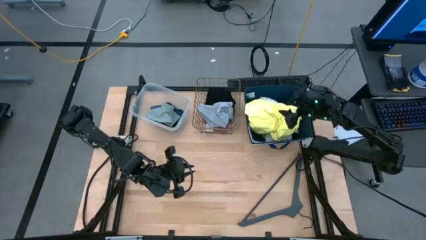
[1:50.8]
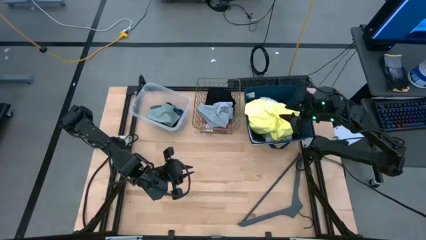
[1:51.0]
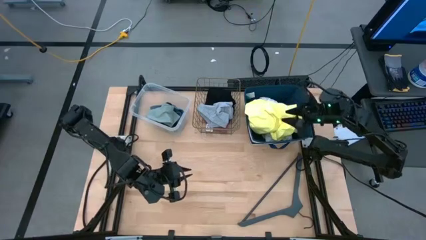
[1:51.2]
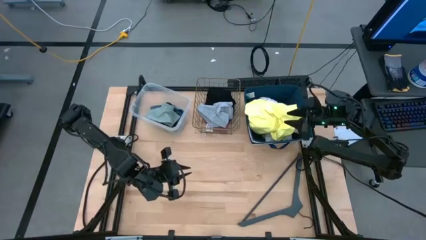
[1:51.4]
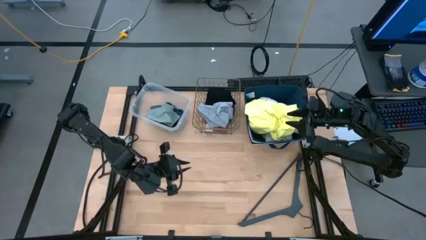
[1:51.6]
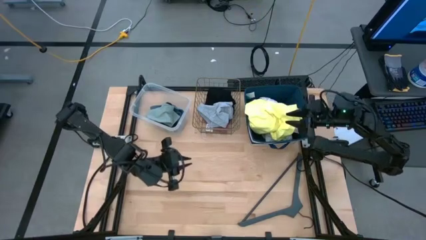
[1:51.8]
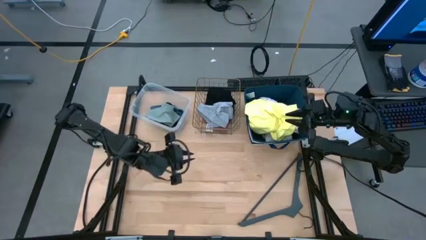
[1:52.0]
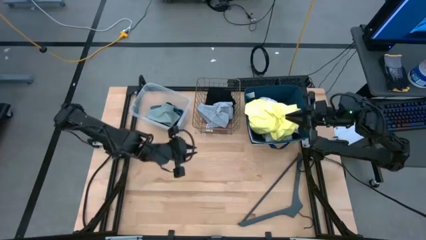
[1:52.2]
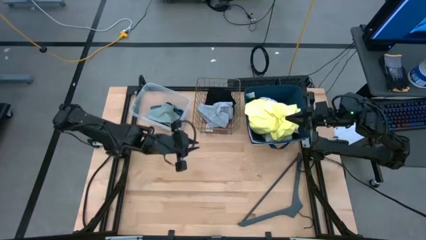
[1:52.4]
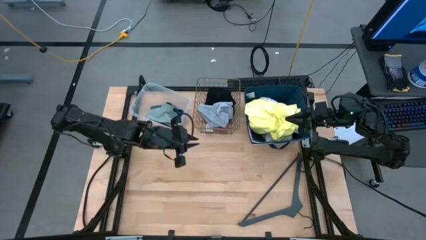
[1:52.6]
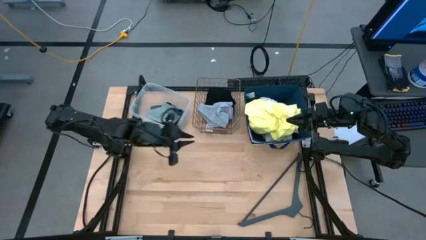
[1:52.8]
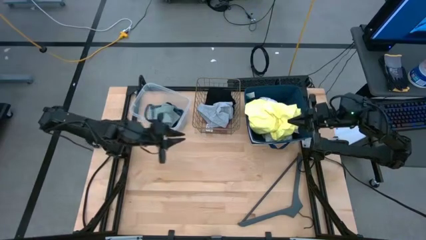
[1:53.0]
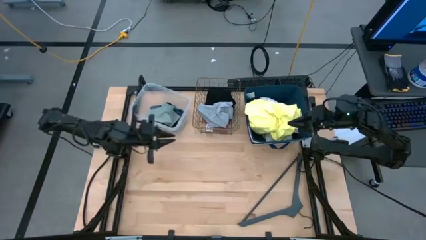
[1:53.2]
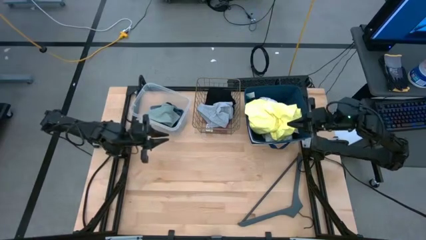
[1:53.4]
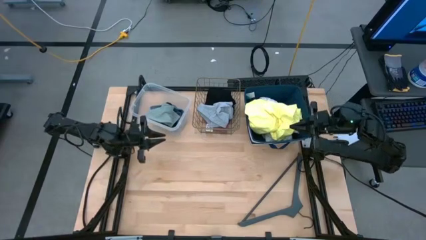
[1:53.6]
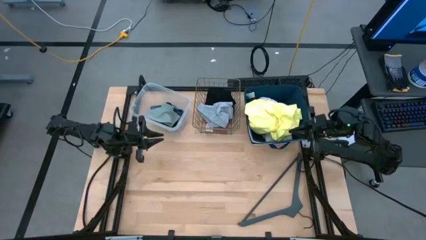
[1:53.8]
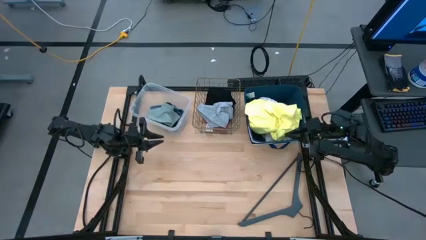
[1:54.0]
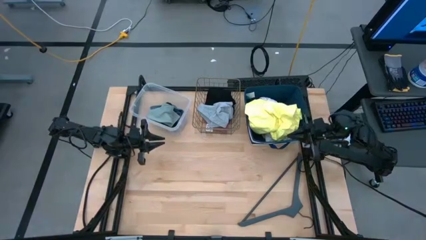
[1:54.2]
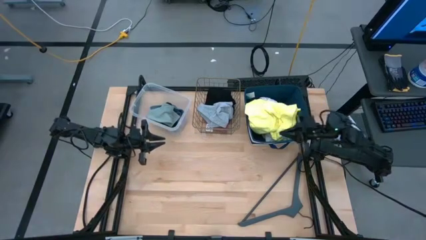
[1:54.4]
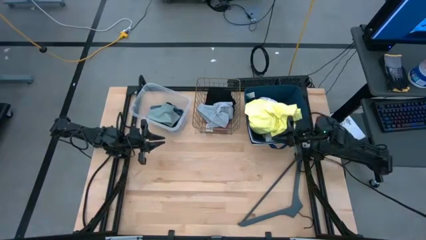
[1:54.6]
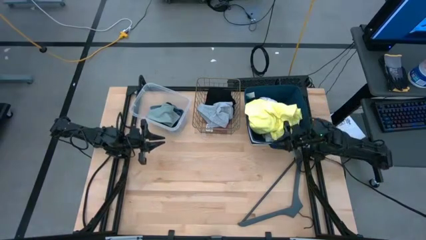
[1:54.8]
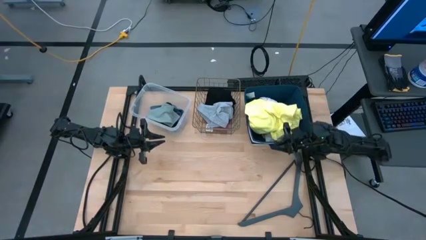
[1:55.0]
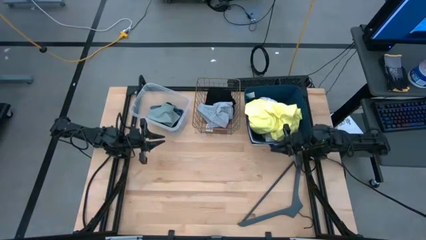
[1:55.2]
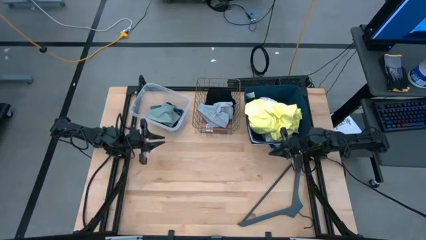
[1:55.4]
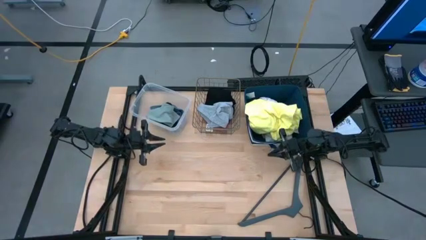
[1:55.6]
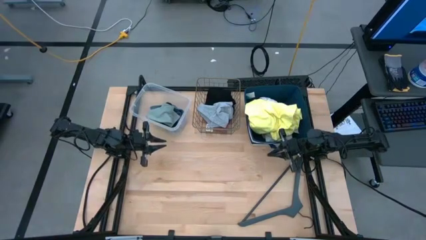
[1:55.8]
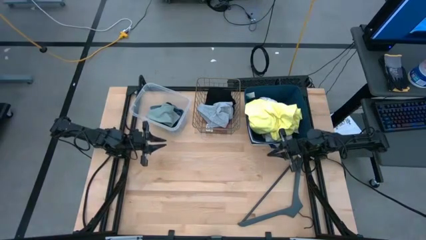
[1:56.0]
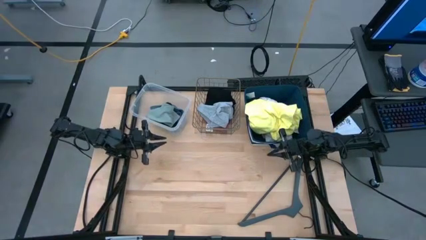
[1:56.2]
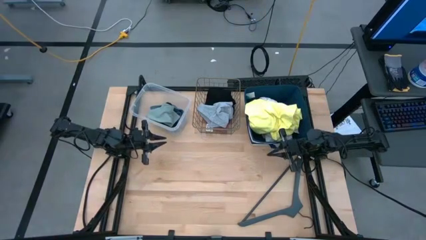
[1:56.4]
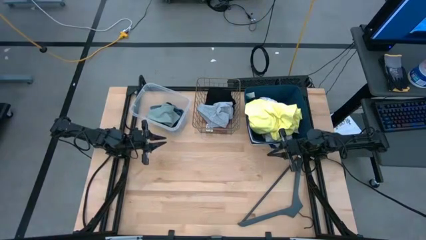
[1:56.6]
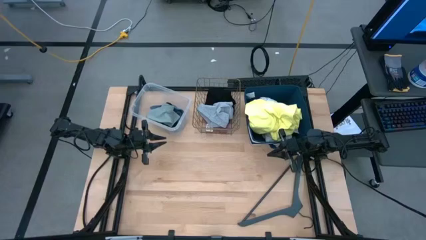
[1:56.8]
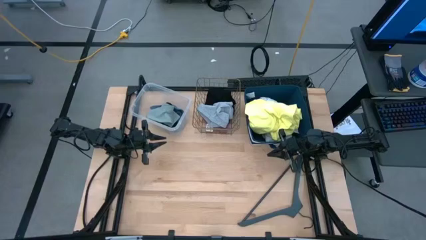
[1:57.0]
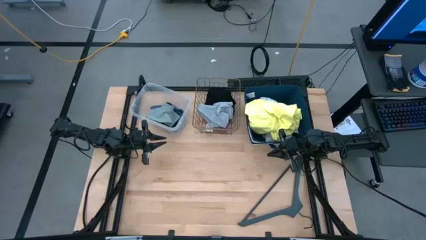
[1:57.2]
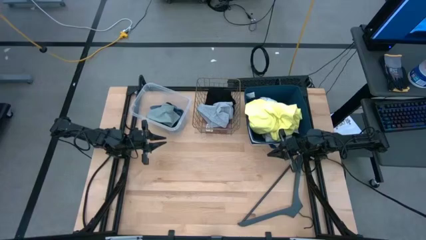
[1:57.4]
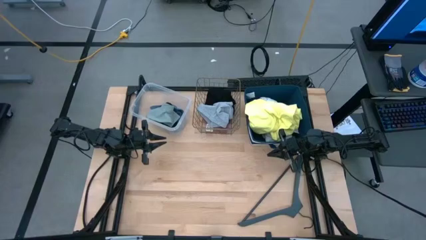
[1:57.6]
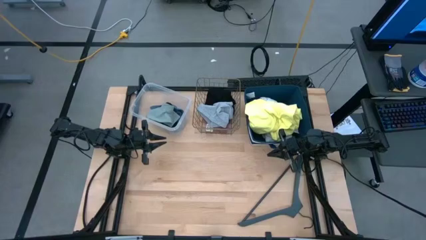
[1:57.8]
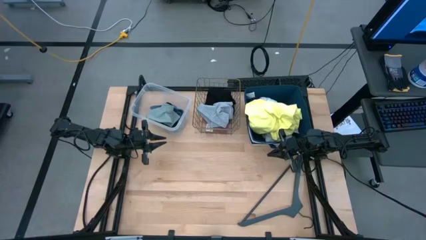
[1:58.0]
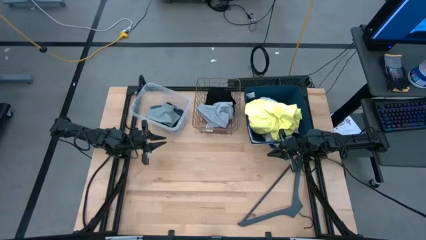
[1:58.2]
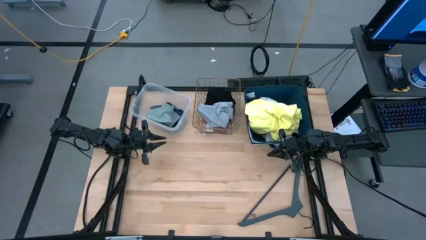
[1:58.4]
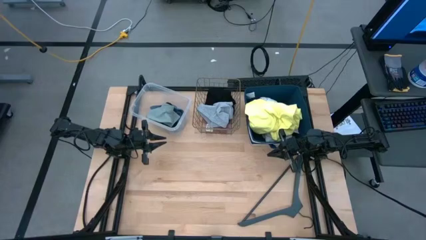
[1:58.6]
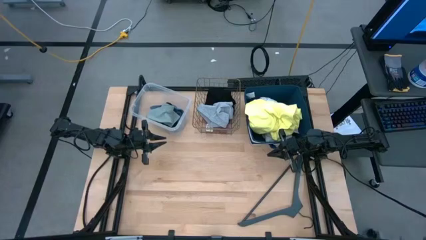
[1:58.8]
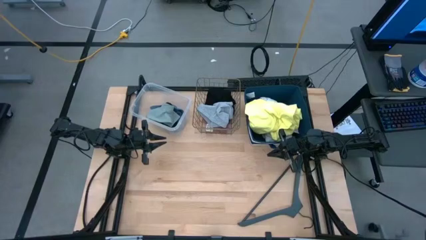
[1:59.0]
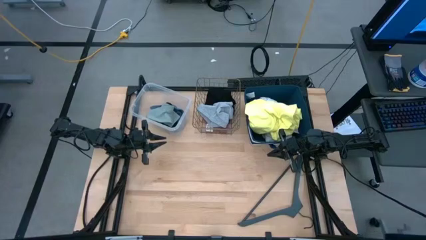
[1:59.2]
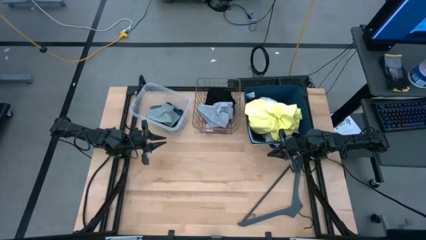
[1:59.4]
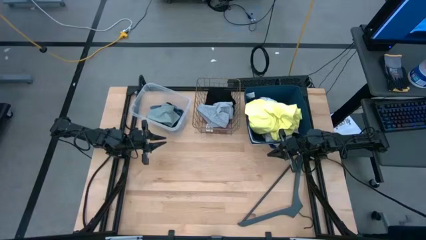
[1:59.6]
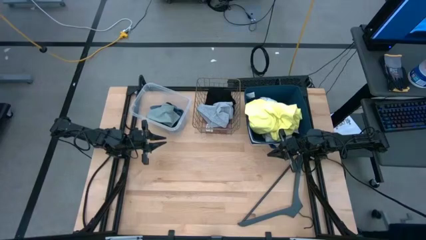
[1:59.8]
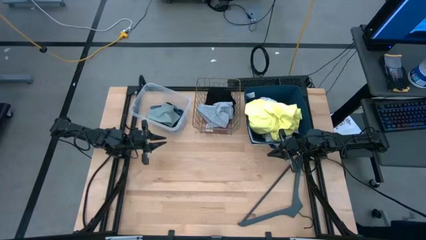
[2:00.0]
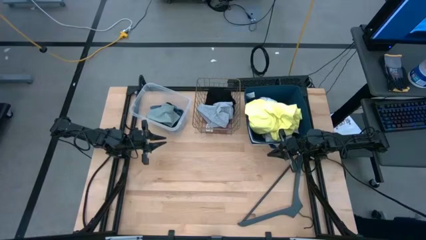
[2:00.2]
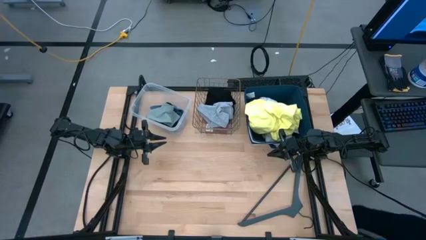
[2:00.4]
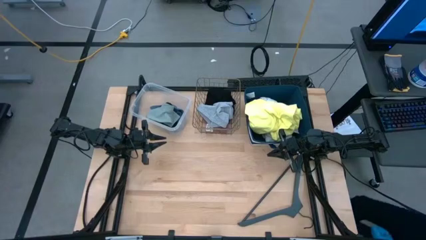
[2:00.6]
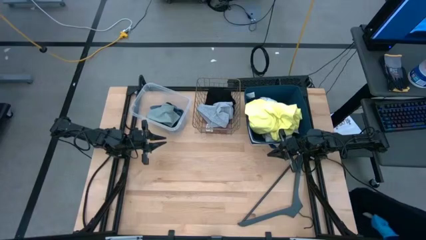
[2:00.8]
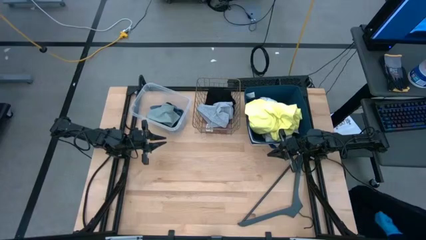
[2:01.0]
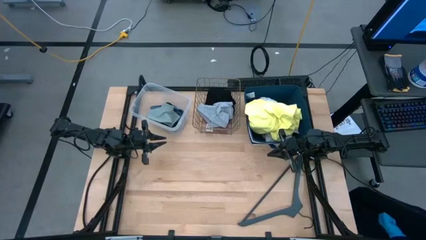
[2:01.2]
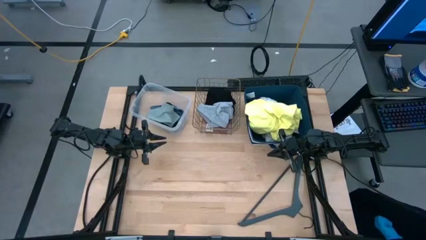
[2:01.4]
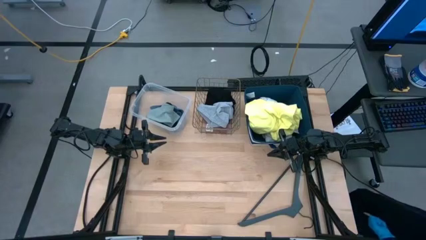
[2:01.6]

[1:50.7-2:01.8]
Task: Pick & Place Cloths
Return to Home Position

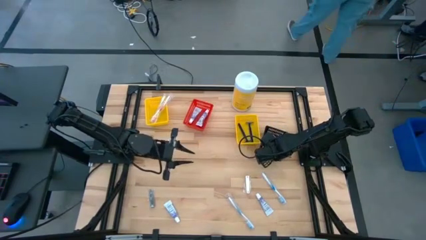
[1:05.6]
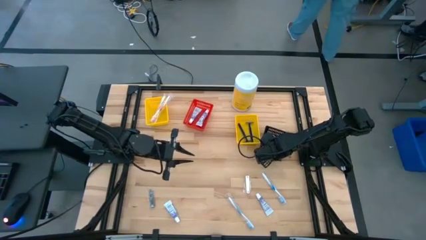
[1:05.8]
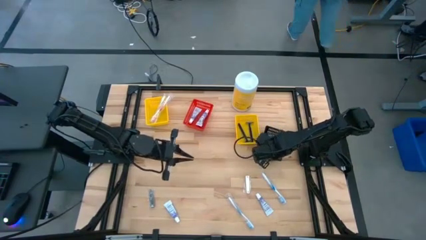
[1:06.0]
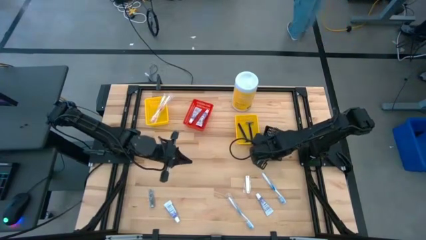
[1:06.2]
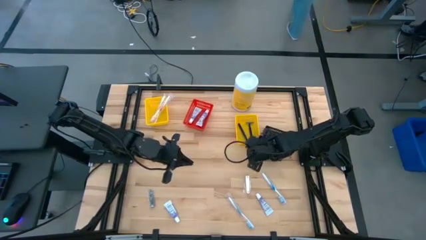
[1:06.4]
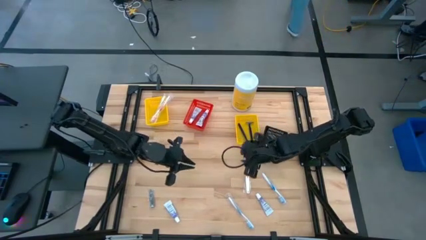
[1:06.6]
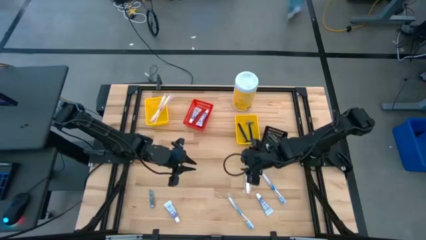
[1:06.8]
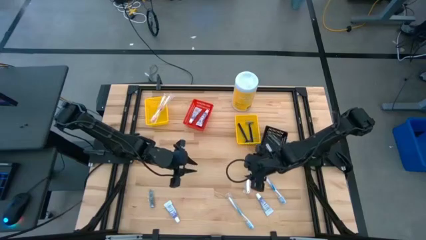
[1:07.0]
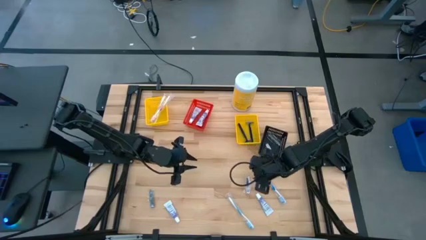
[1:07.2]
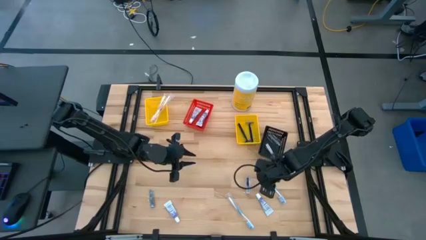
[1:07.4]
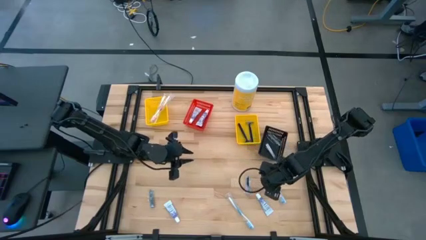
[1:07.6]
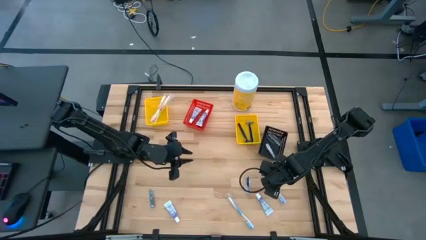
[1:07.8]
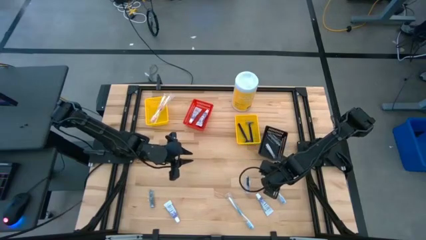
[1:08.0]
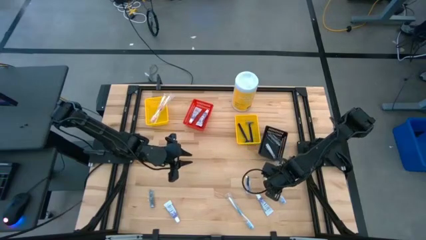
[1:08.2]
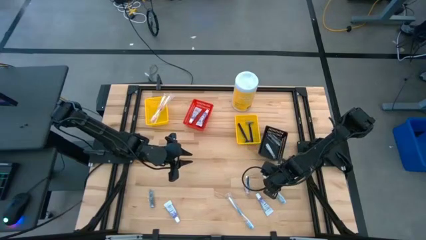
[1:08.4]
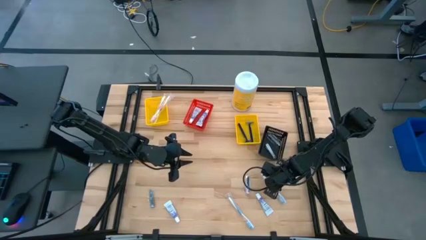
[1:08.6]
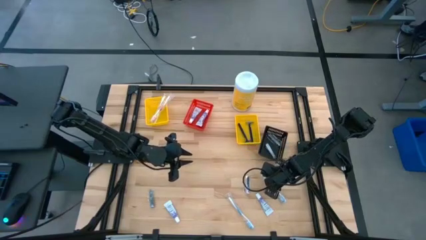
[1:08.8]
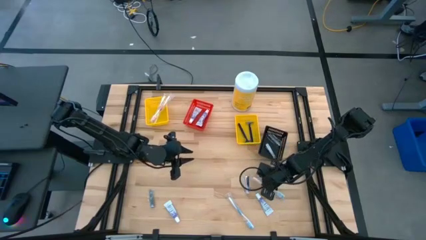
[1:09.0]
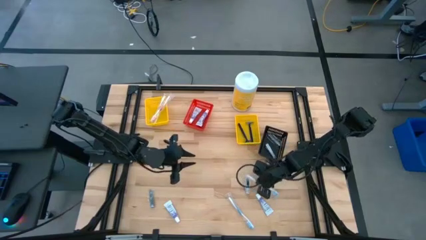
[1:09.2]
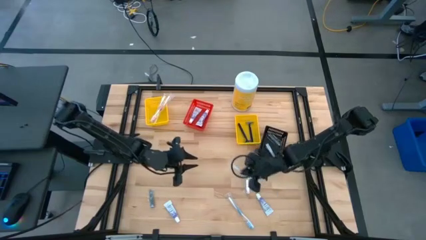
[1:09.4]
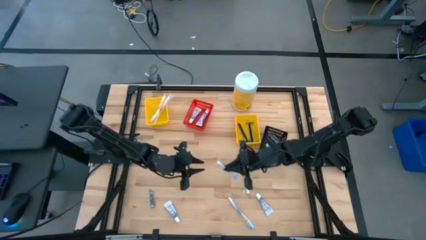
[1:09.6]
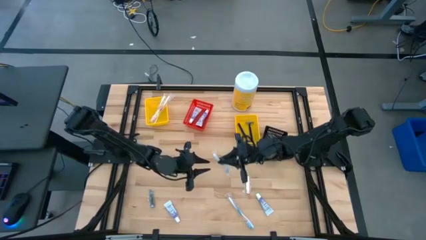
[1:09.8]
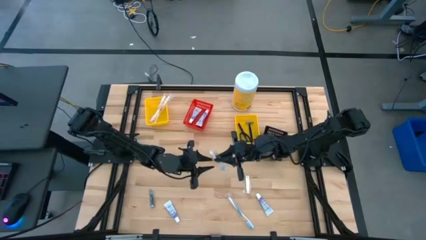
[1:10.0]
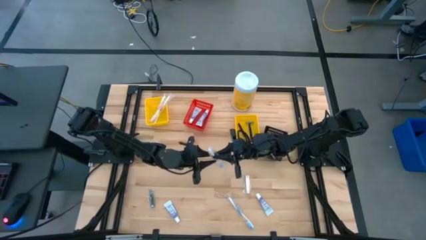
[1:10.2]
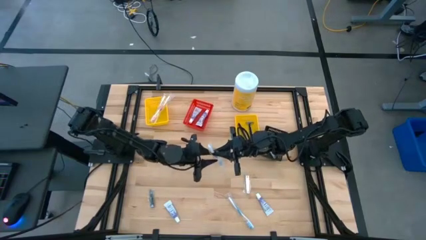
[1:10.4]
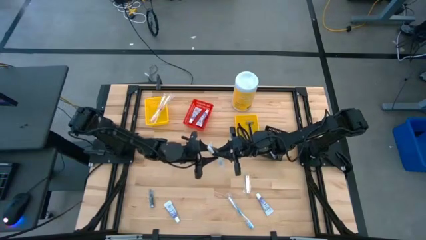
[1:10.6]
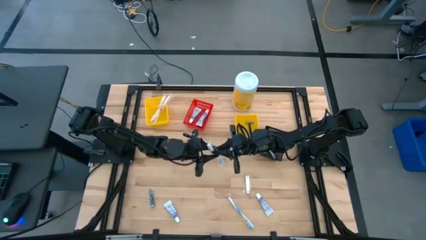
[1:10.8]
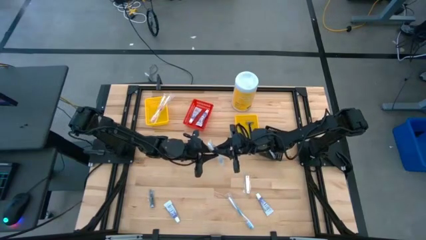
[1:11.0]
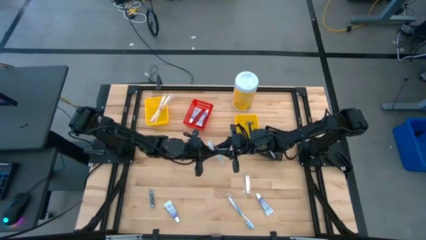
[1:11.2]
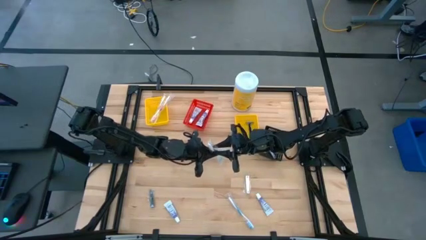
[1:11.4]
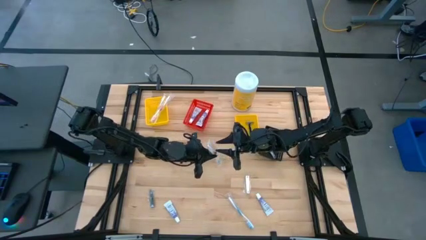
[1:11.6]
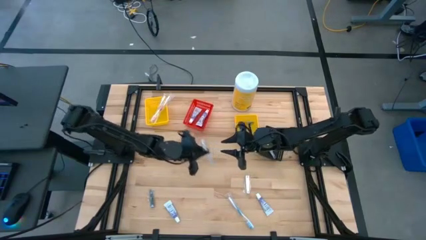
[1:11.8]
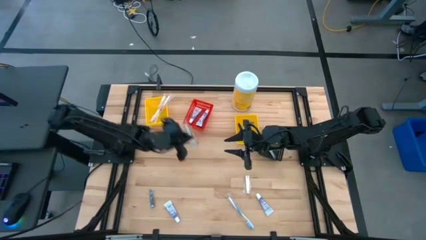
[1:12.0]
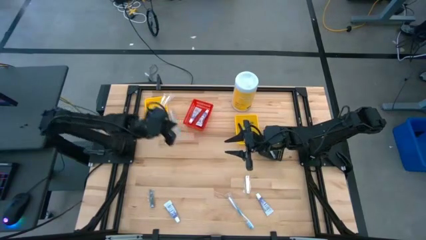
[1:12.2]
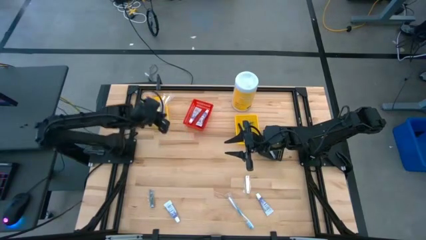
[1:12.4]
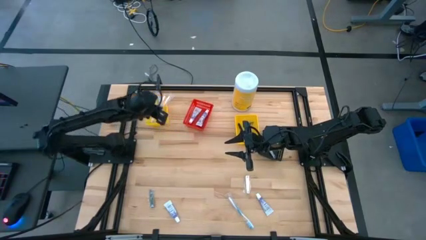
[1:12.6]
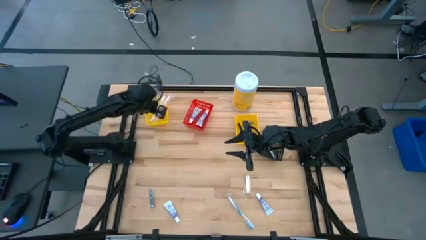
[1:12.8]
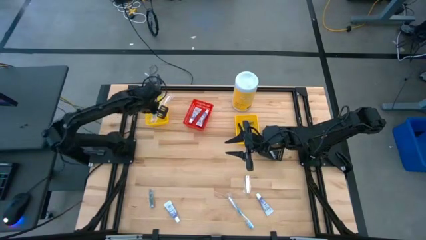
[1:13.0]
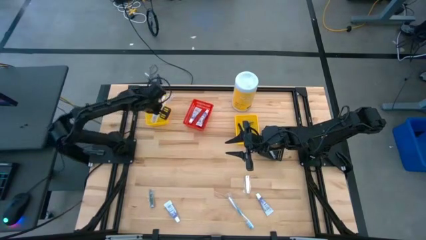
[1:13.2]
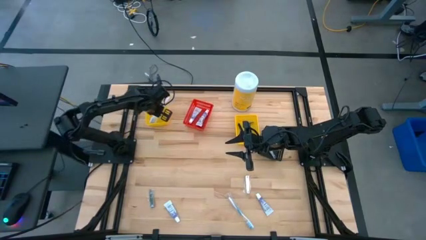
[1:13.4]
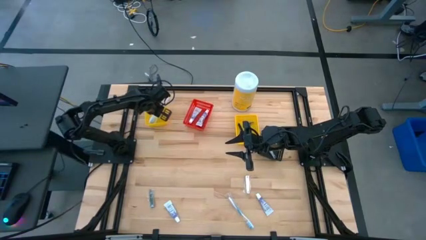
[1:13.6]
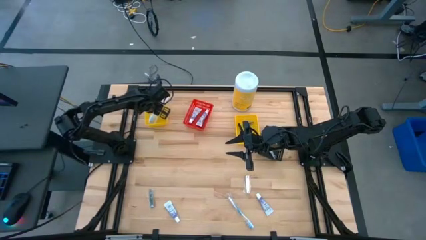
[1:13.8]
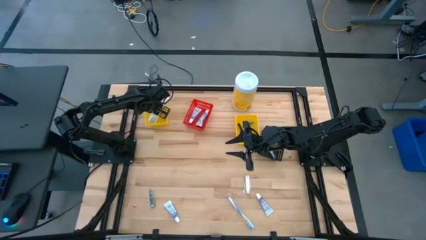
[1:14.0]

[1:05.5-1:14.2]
Task: Pick & Place Travel size toiletries
Put the blue toothbrush into the left yellow basket
